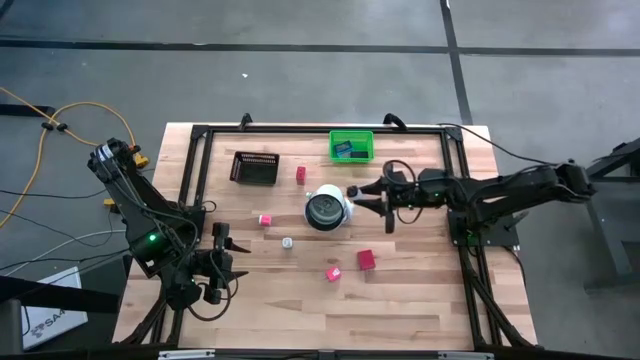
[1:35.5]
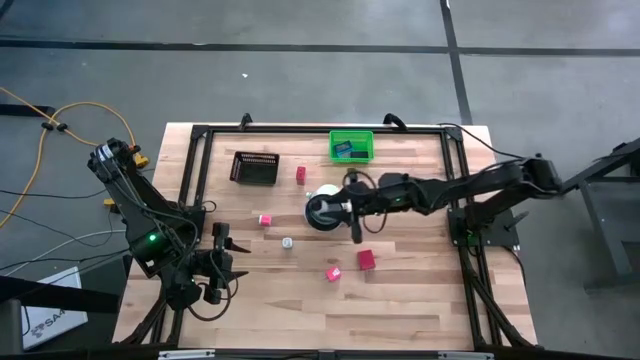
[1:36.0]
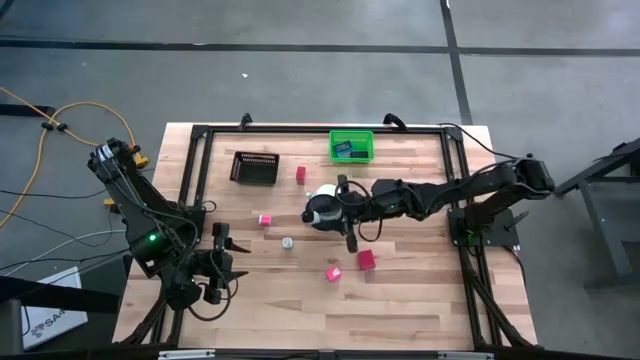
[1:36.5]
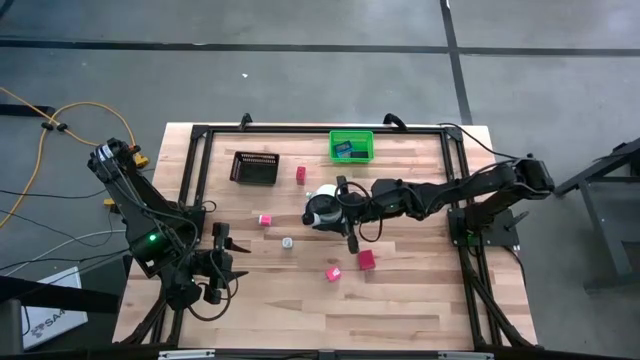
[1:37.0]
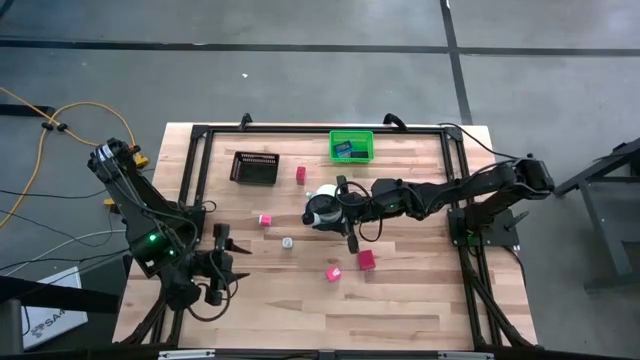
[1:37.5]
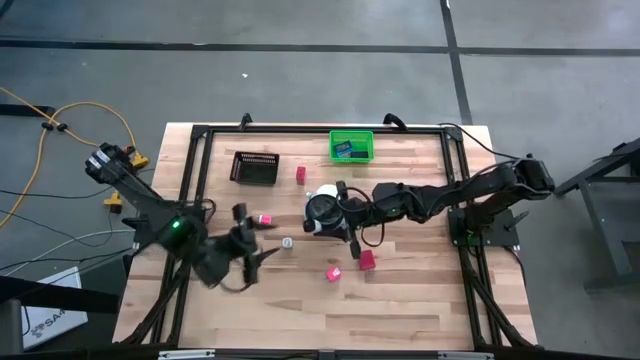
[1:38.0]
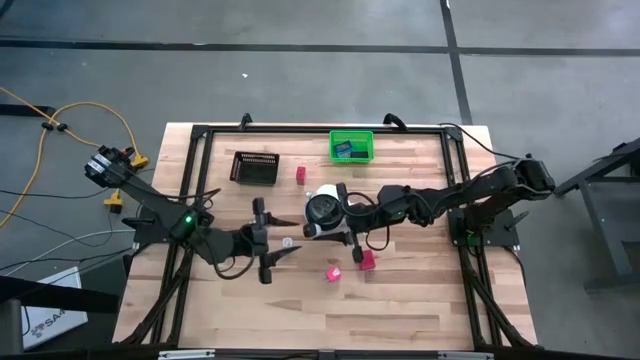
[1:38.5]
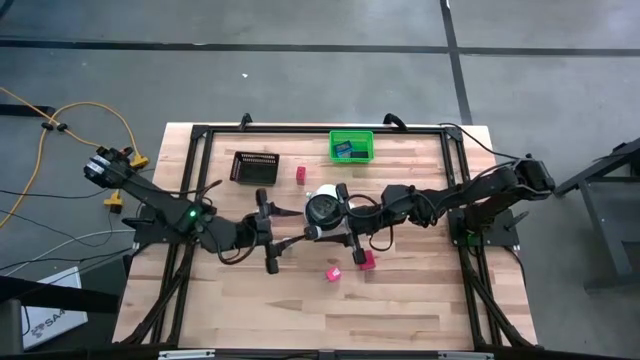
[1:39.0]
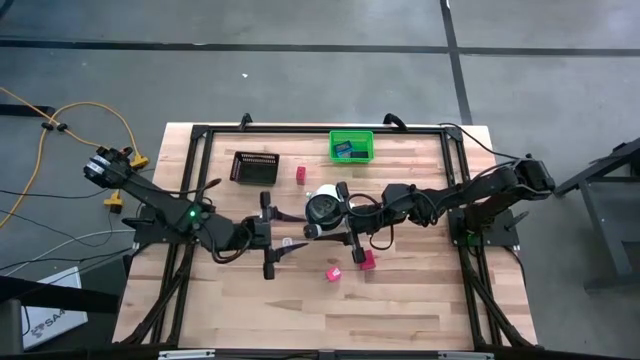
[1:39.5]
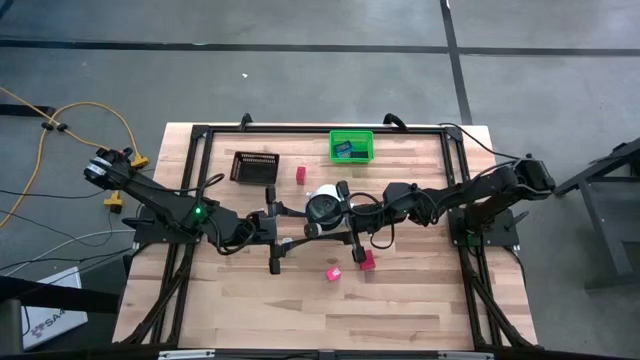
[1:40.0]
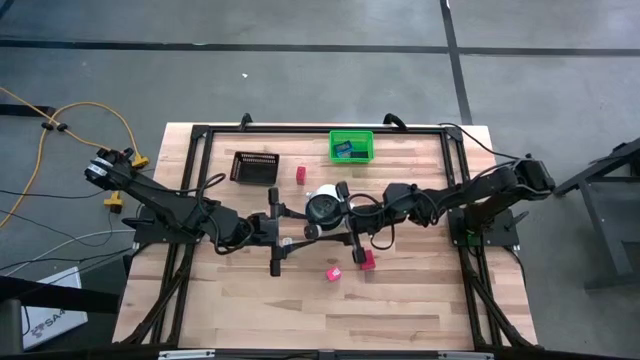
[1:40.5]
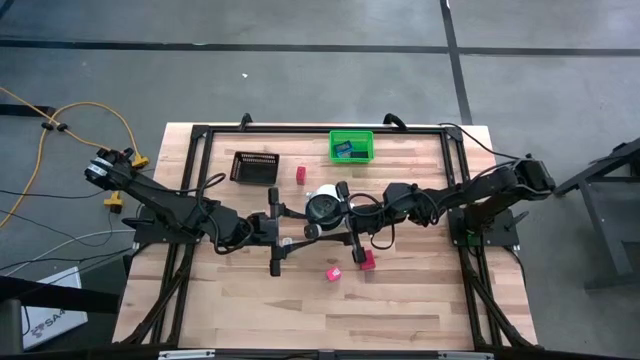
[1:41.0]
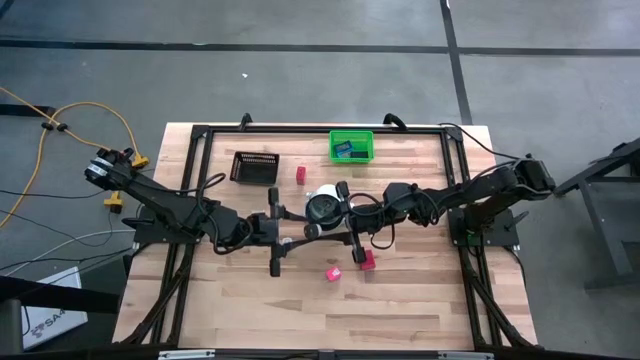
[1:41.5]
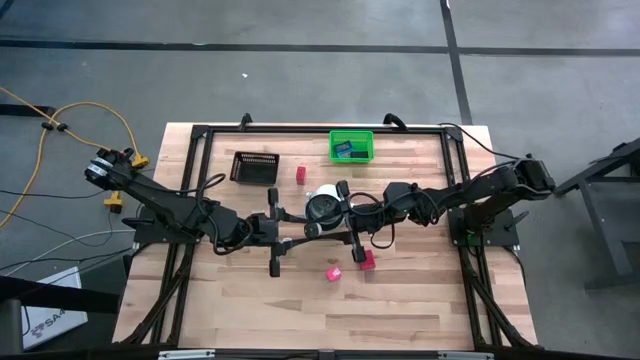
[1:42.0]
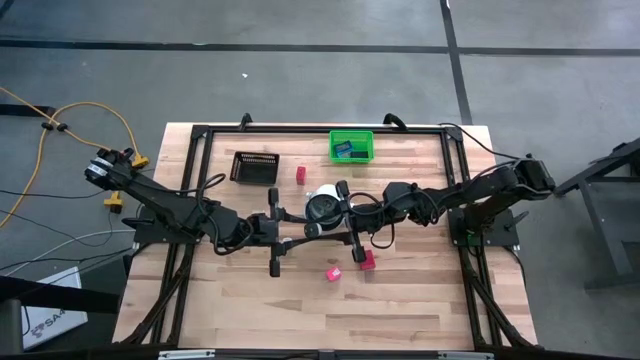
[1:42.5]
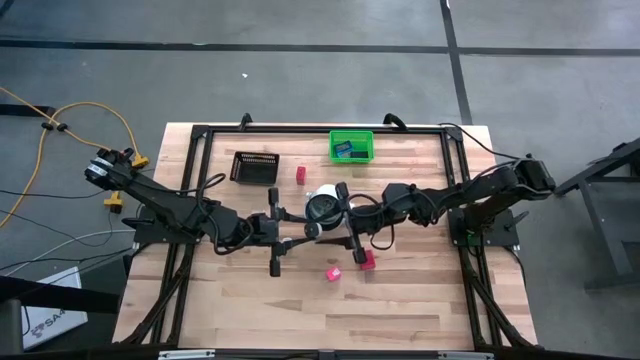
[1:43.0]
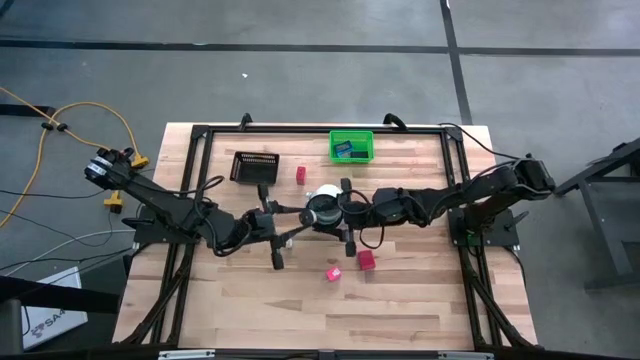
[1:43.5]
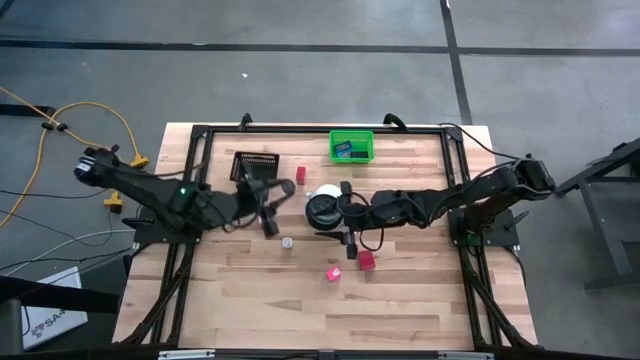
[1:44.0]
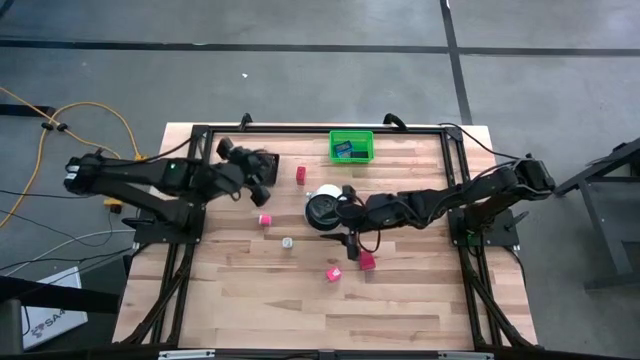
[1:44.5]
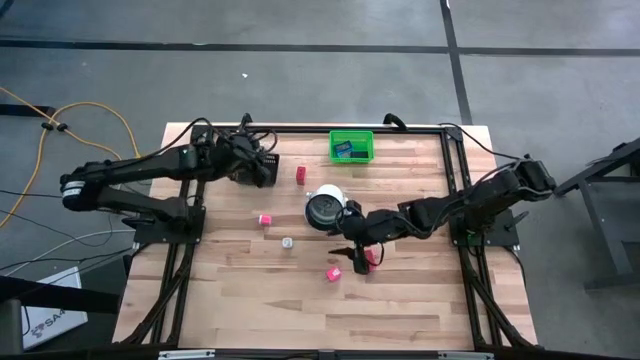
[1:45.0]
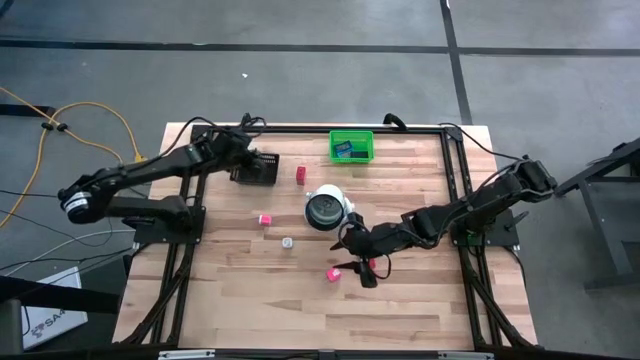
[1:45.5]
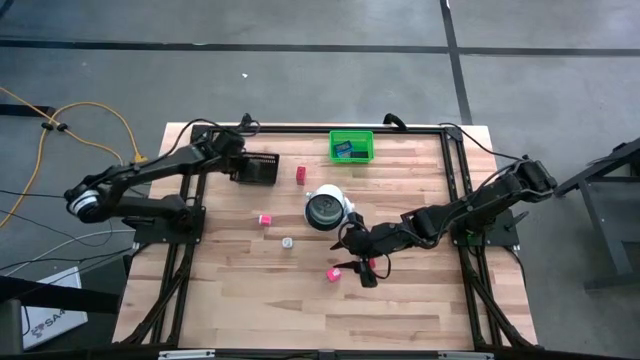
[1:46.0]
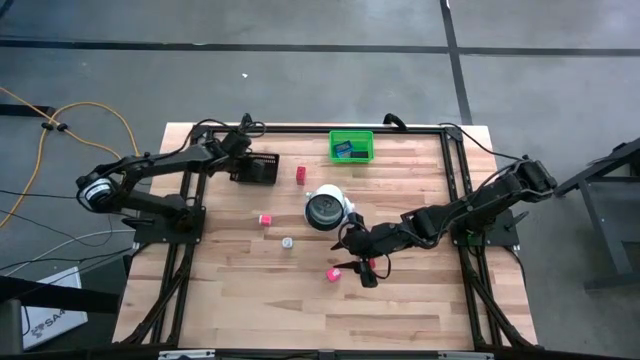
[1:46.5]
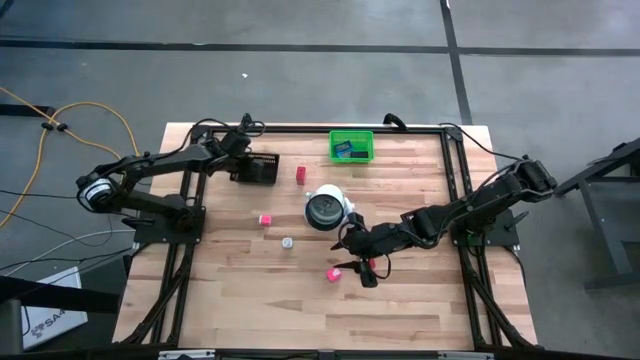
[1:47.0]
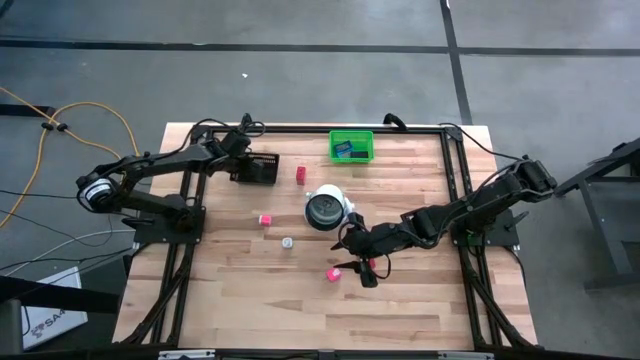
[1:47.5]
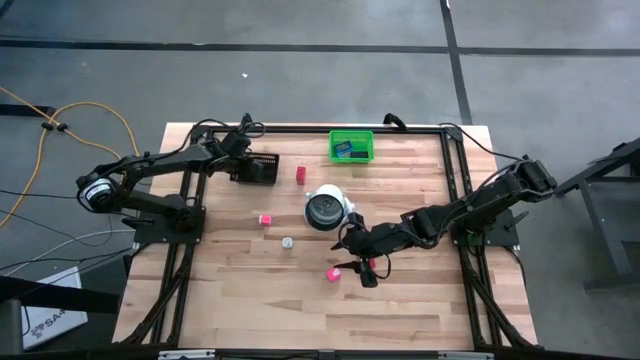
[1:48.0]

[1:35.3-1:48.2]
Task: Pick & Place Office items
Put the white charger adapter into the black bin

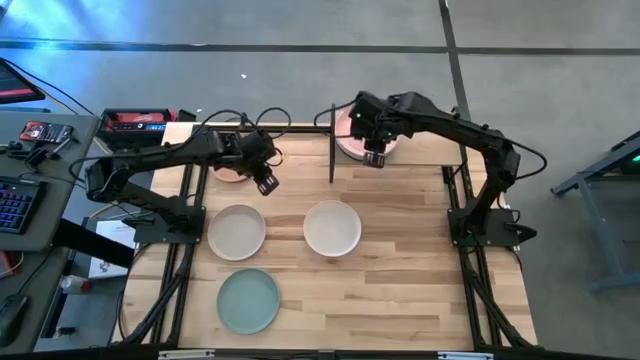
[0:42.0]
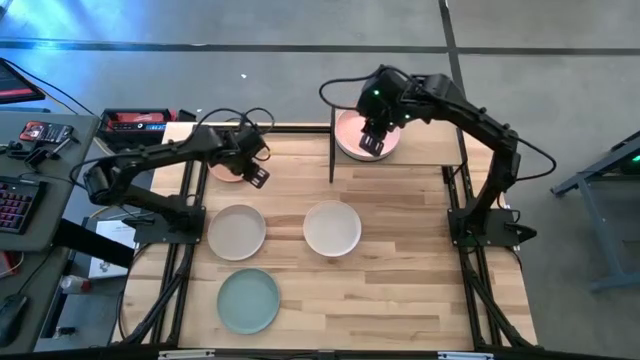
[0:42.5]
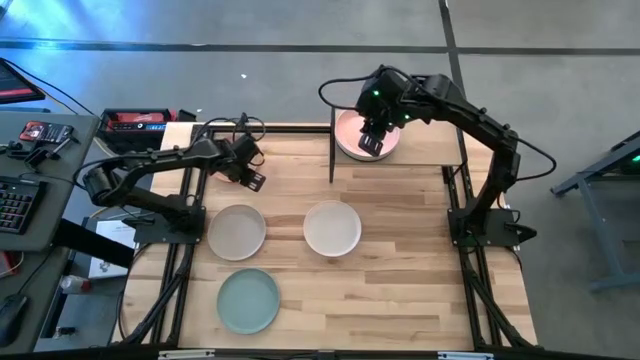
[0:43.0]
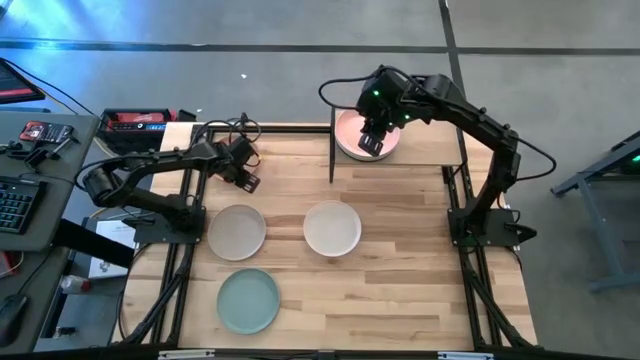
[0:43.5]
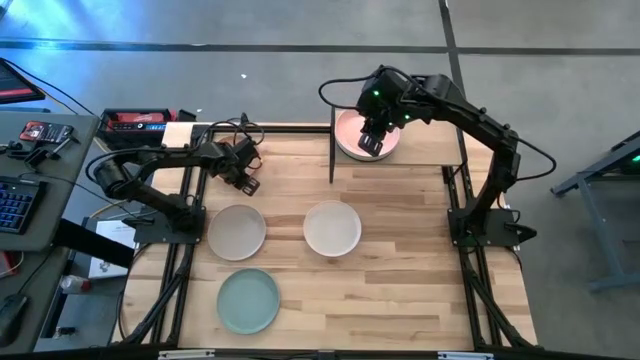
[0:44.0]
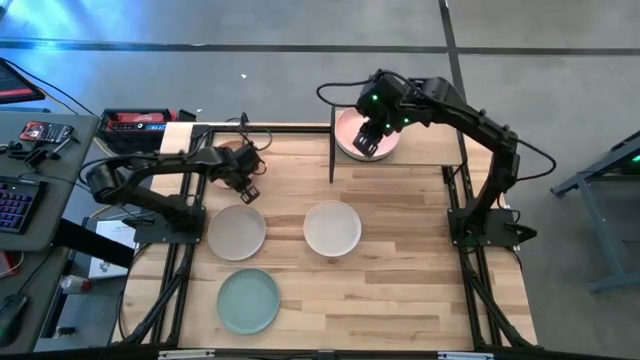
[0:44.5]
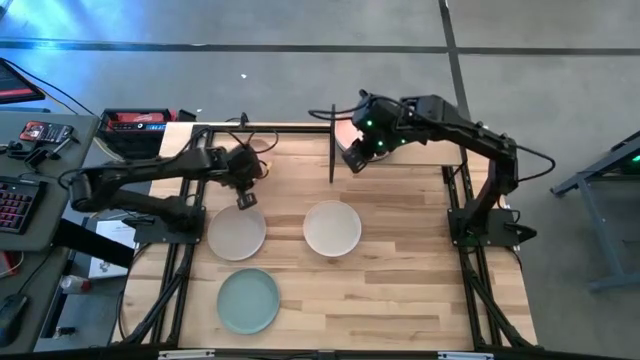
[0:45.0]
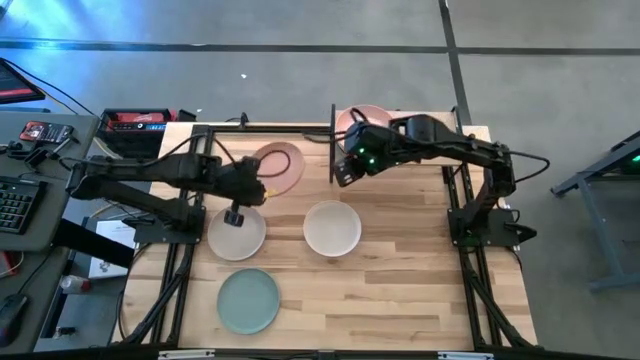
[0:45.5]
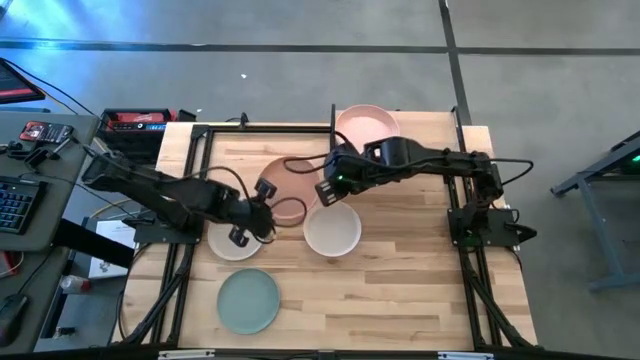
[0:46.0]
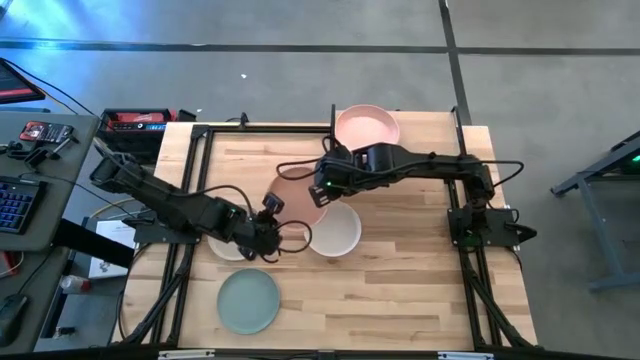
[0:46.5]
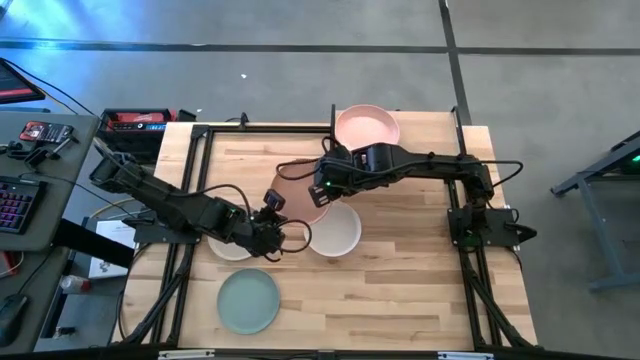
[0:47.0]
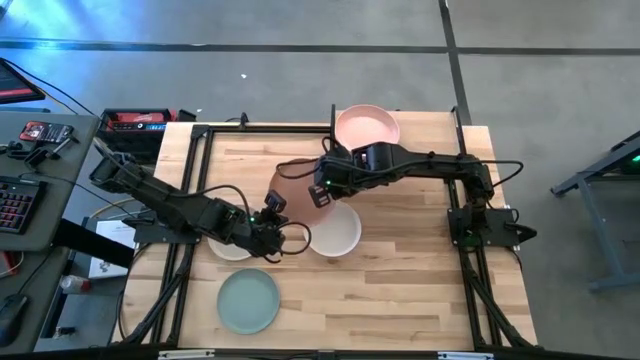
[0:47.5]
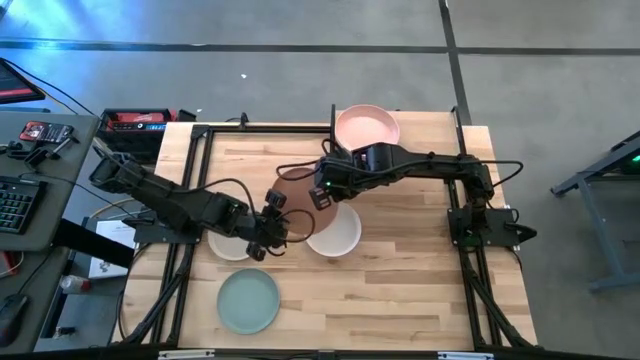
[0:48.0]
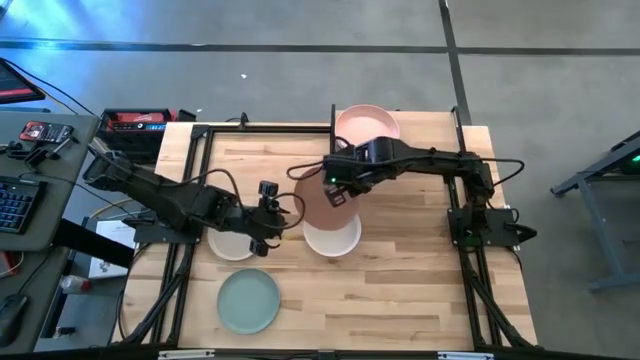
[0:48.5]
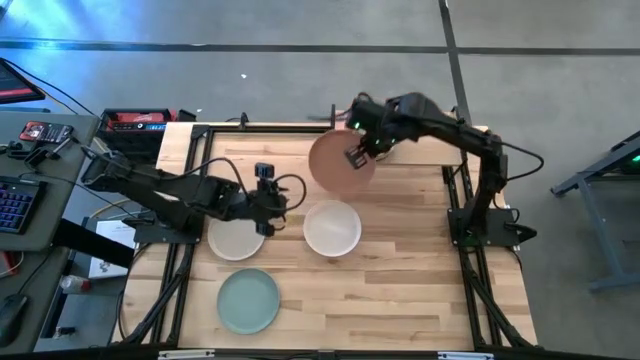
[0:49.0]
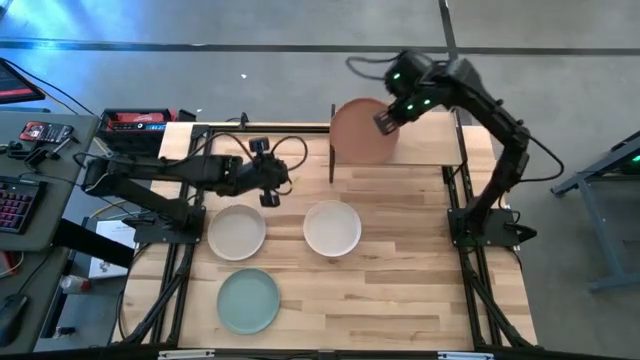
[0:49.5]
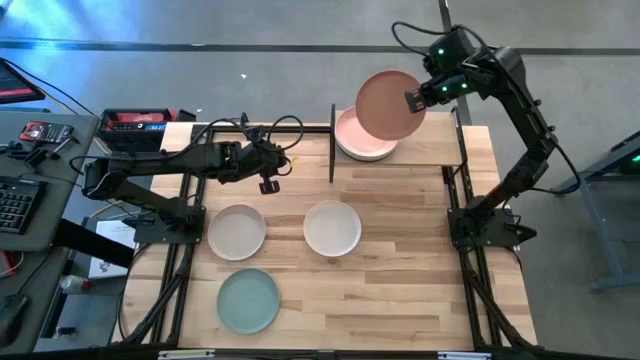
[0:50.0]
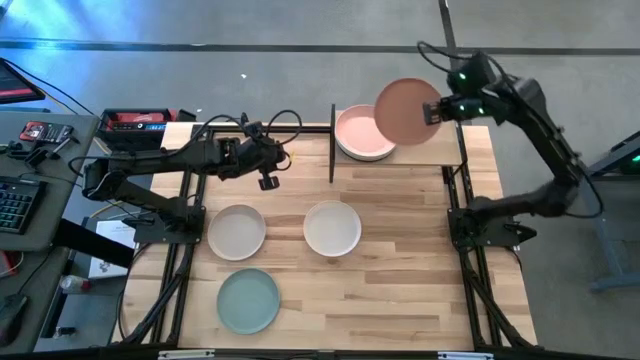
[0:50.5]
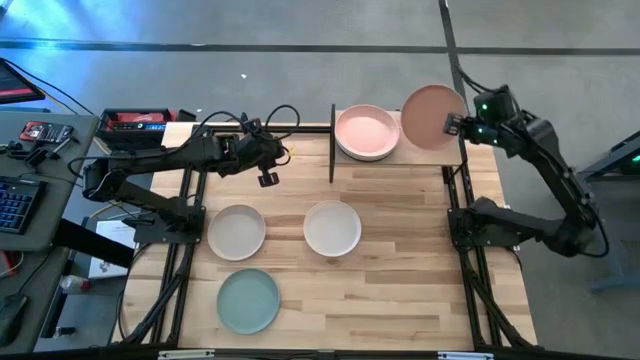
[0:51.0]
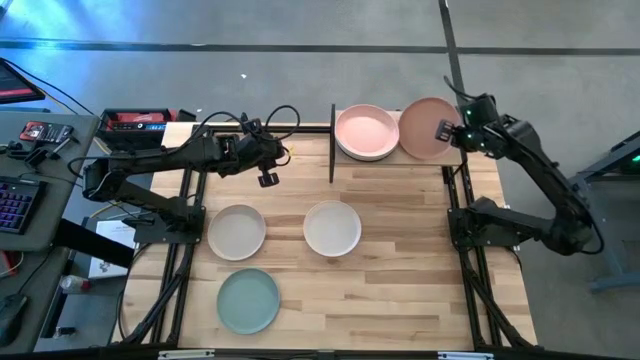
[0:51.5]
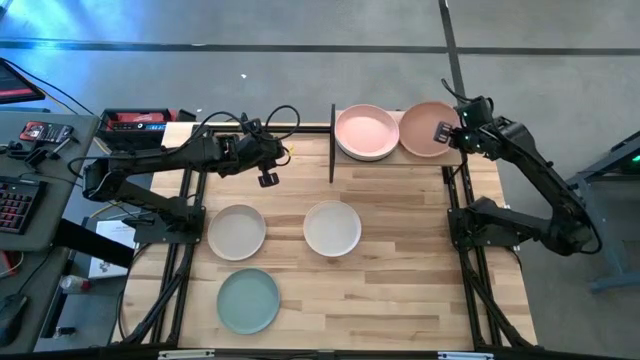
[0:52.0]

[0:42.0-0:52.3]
Task: Place and stack plates onto a shelf
Put the brown plate on the shelf
